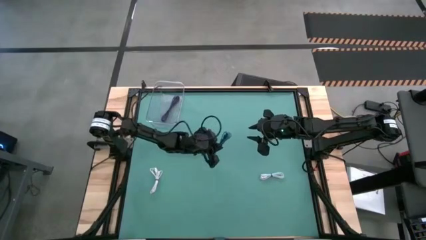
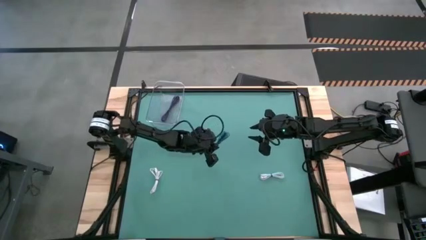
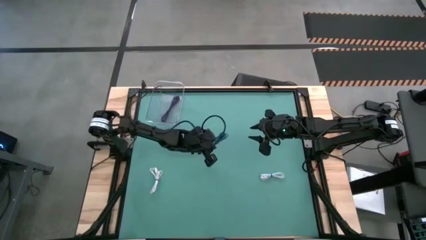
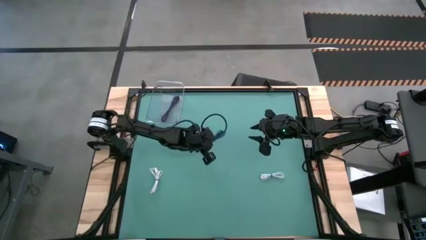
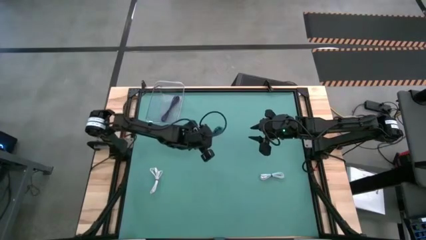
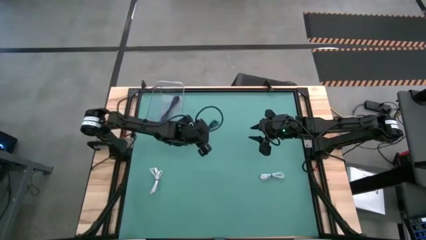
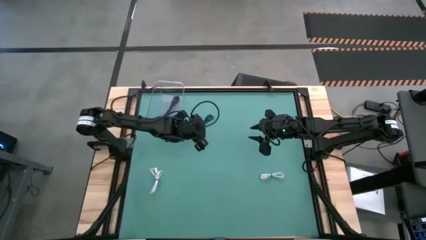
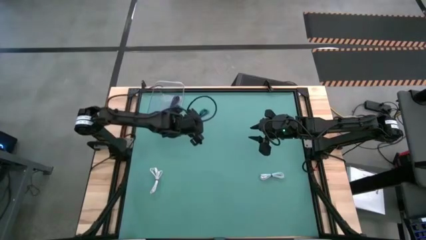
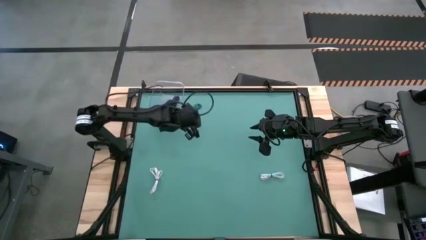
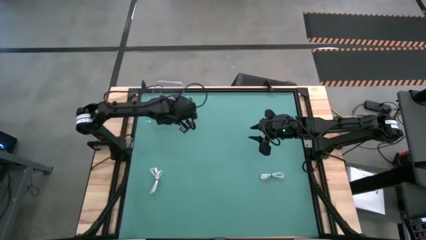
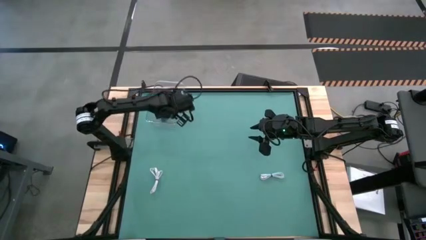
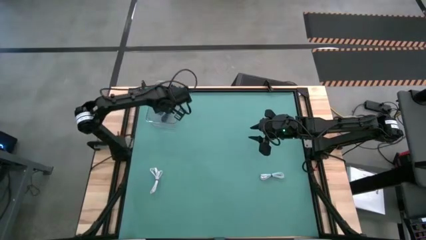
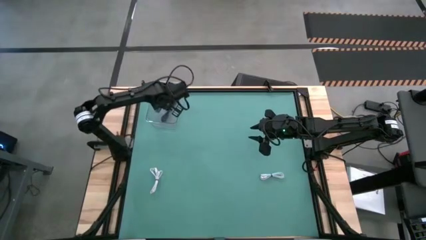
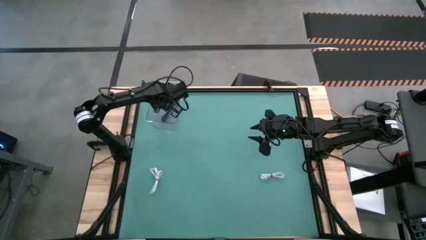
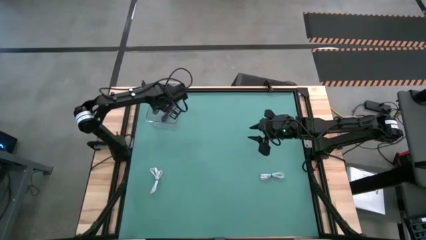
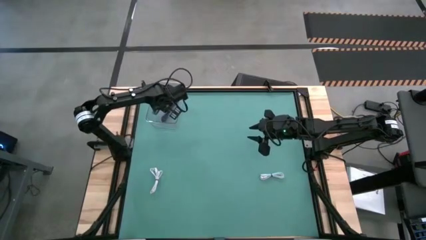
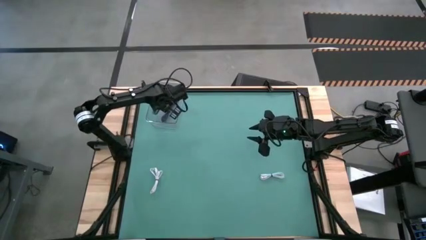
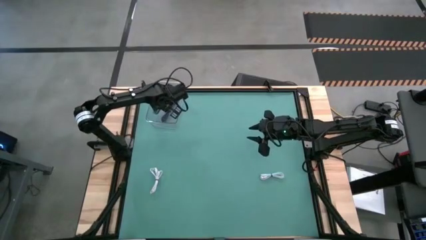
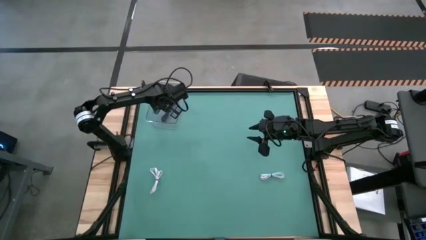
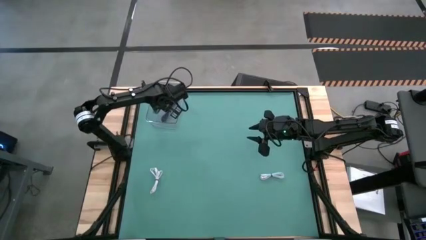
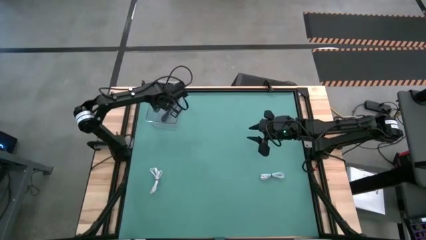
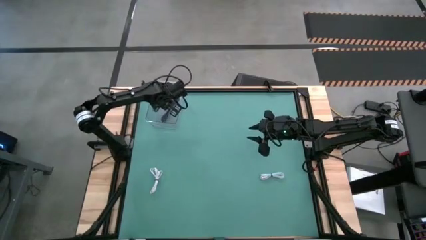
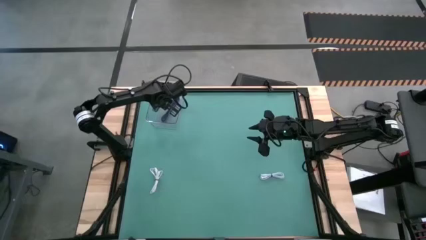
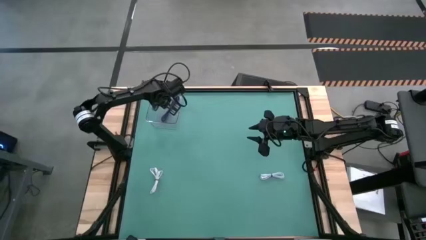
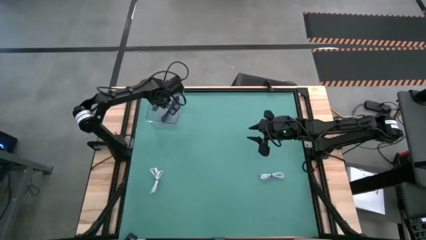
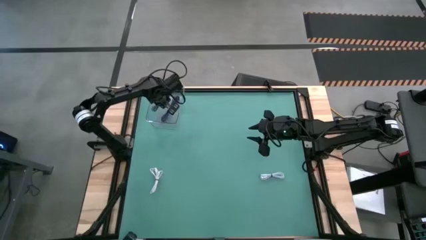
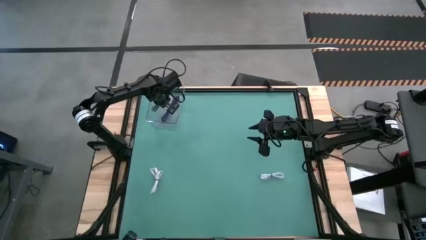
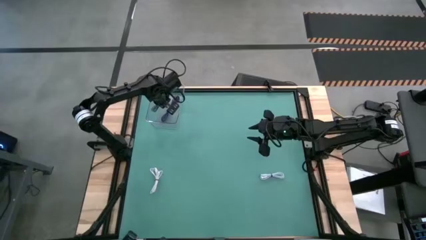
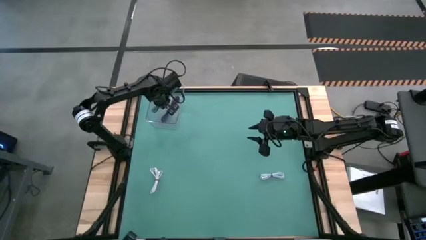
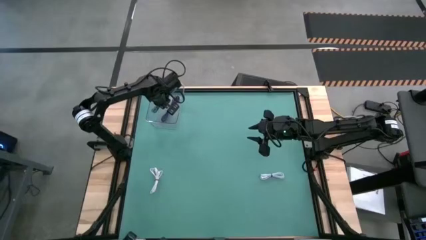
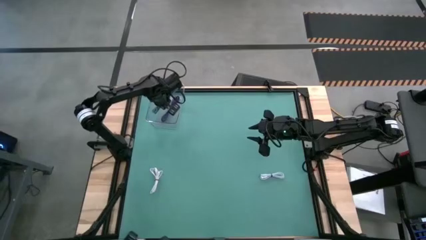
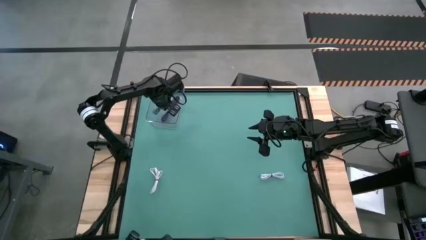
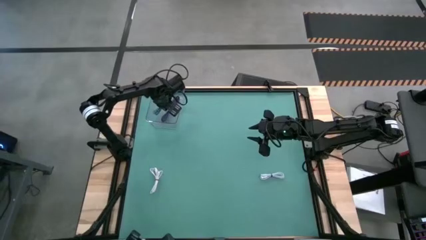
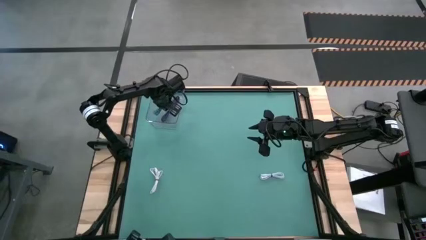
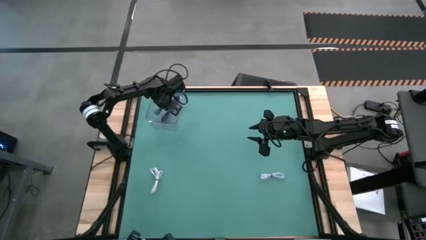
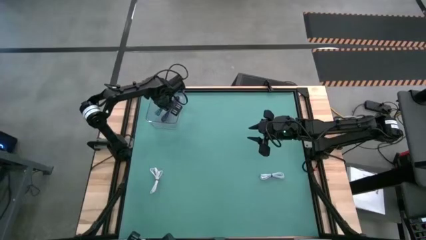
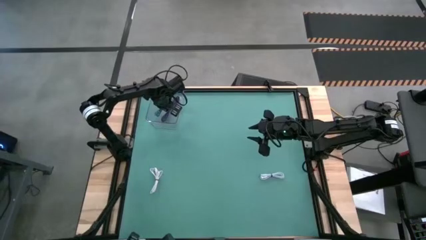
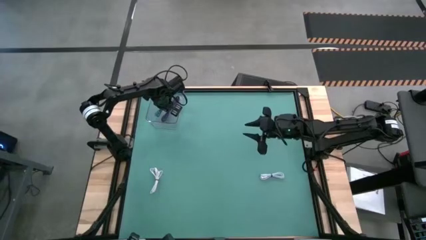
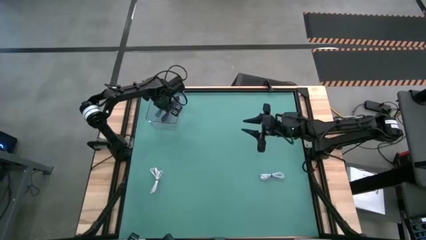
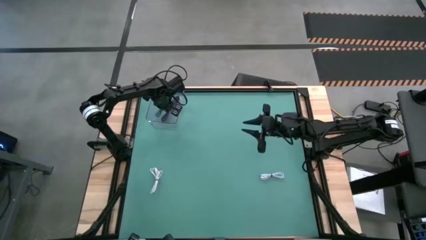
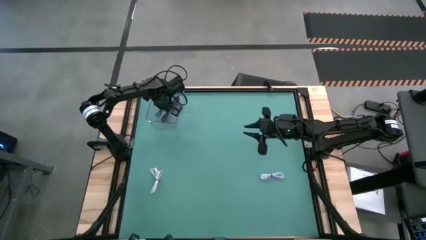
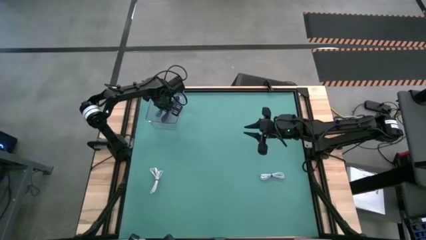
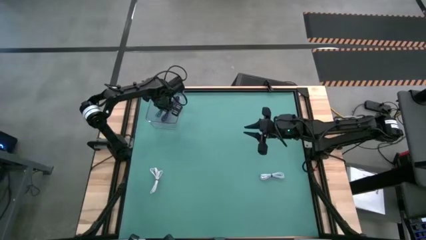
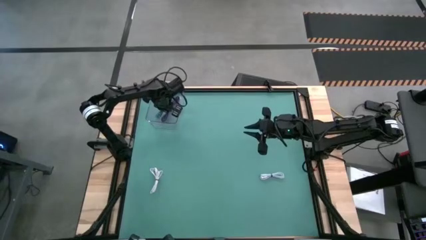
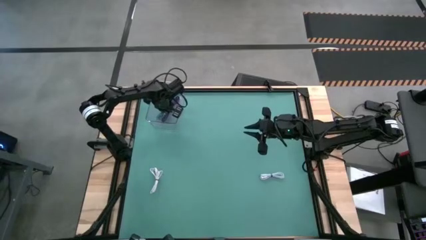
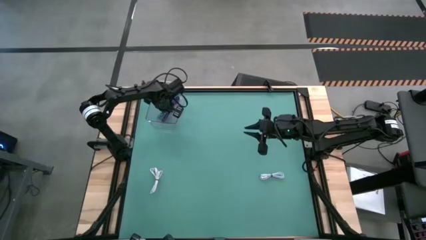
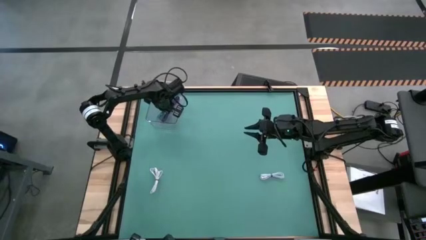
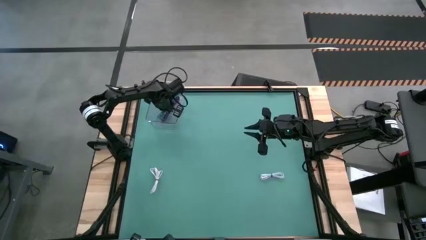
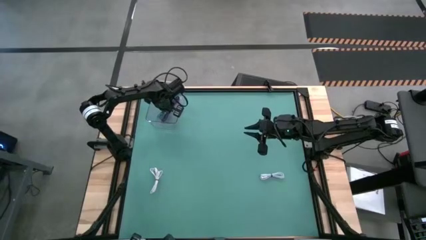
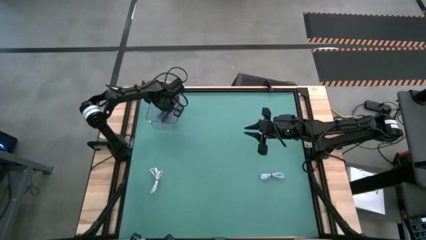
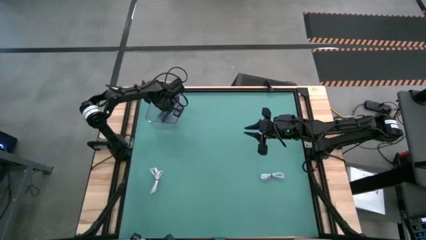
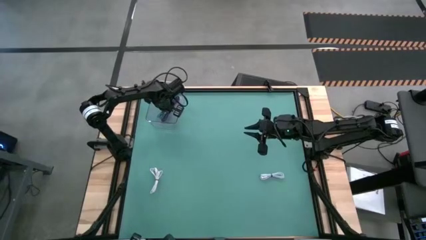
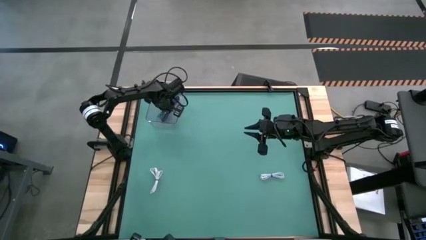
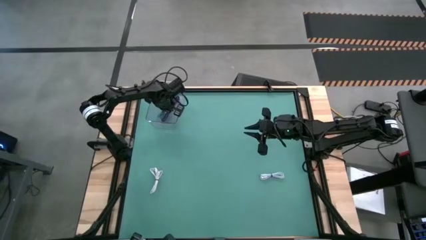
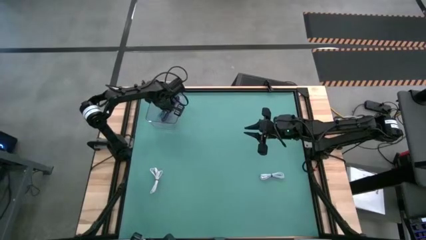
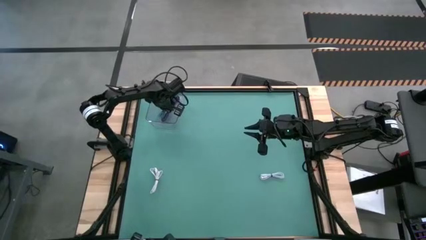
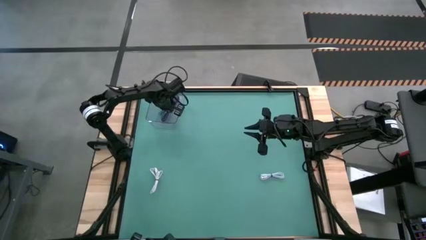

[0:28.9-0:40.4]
Task: Pick and place USB-C Cables
Put the blue charger cable into the transparent bin
